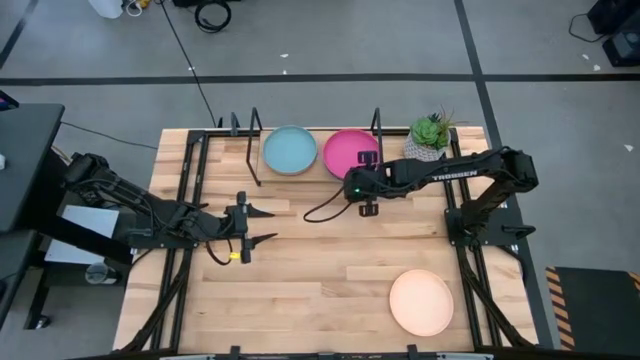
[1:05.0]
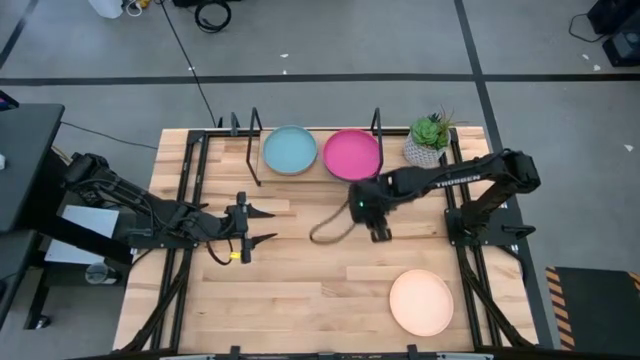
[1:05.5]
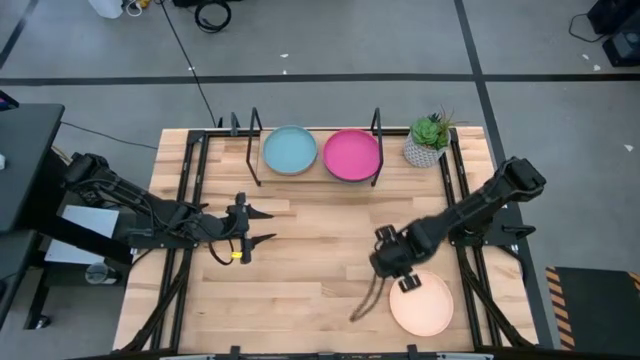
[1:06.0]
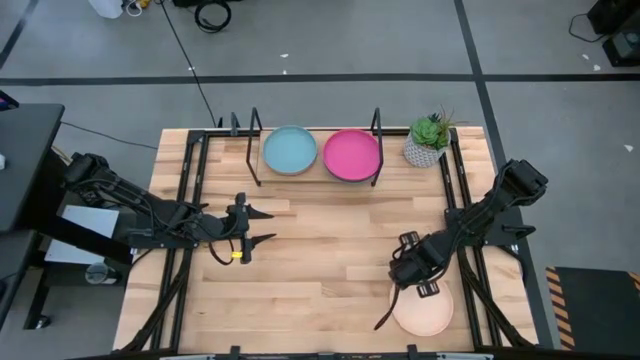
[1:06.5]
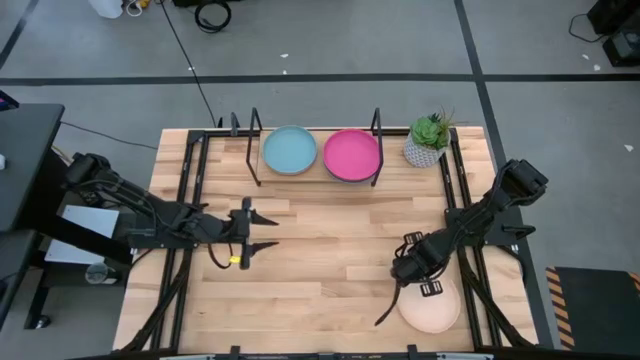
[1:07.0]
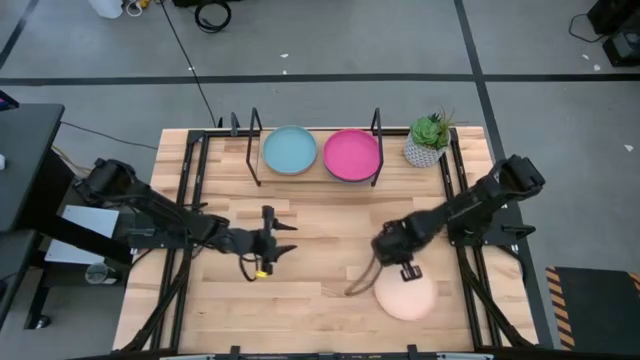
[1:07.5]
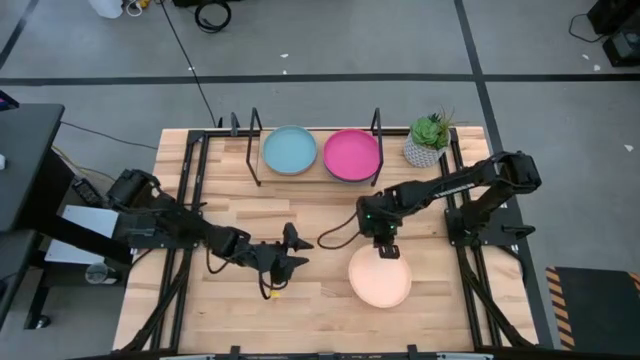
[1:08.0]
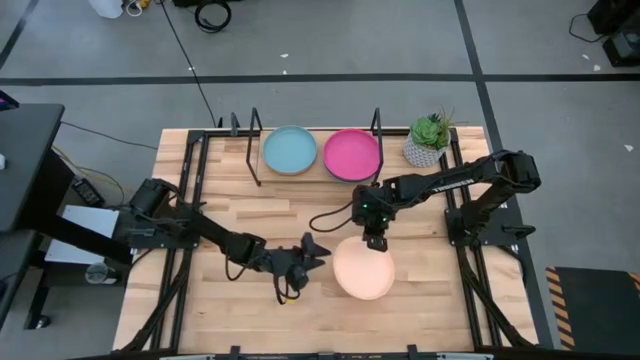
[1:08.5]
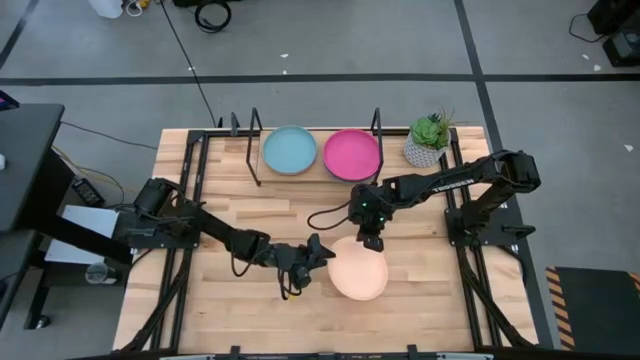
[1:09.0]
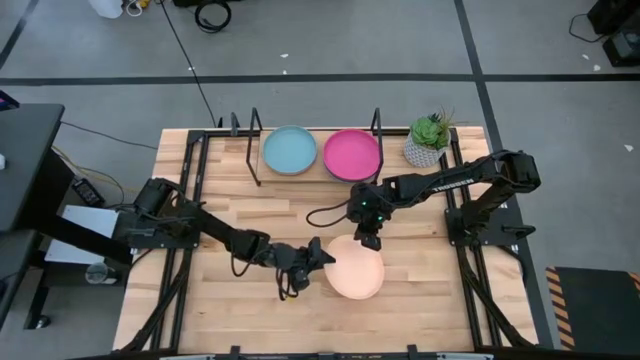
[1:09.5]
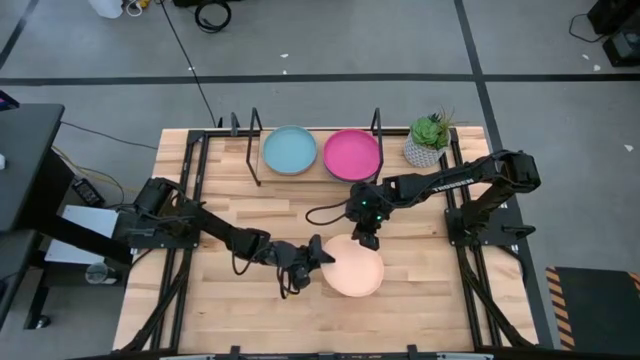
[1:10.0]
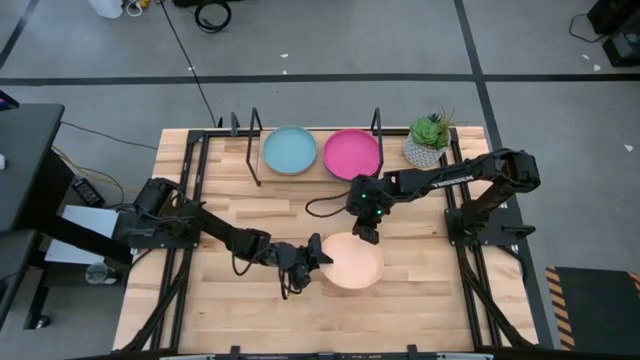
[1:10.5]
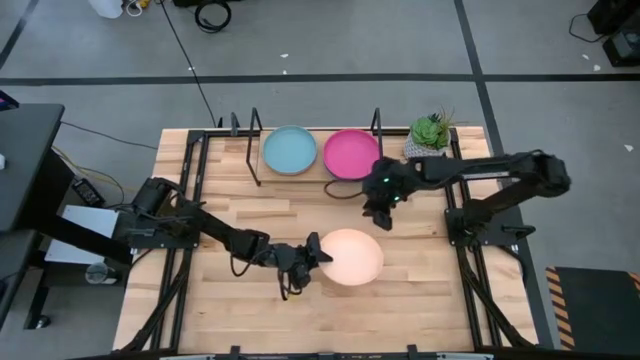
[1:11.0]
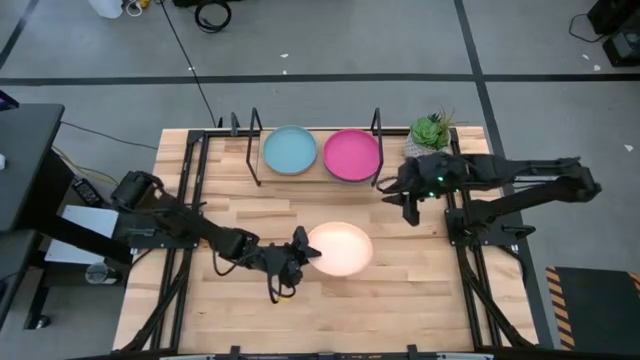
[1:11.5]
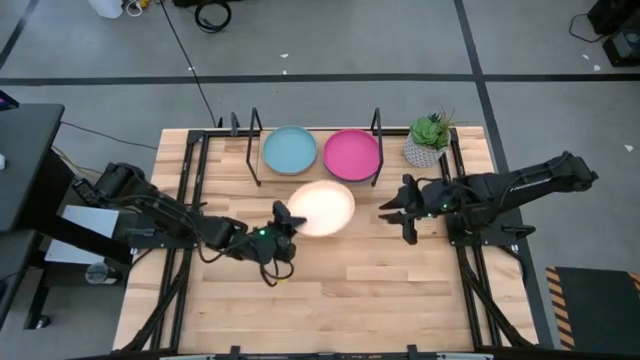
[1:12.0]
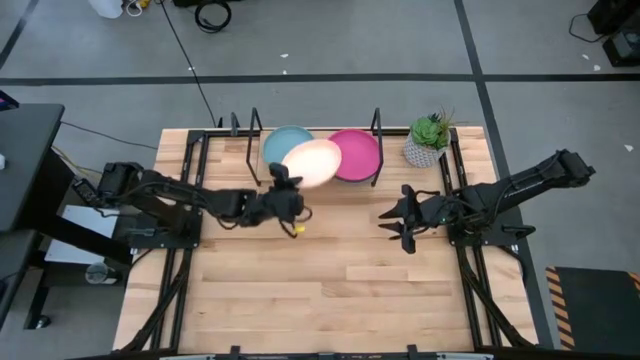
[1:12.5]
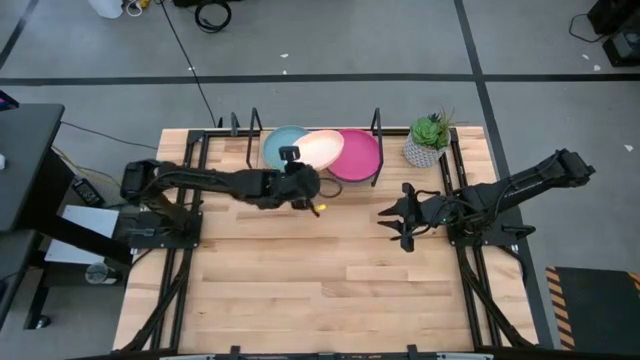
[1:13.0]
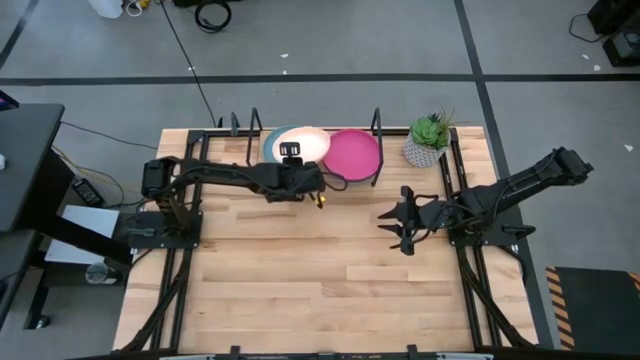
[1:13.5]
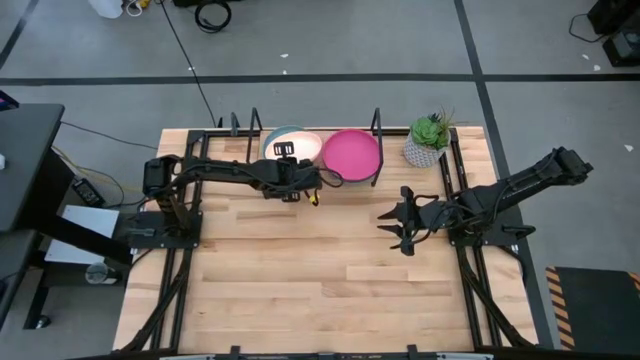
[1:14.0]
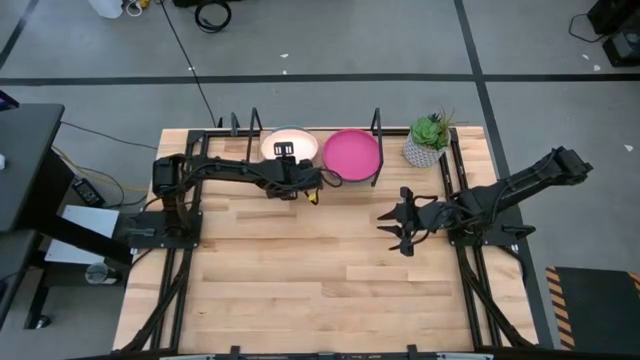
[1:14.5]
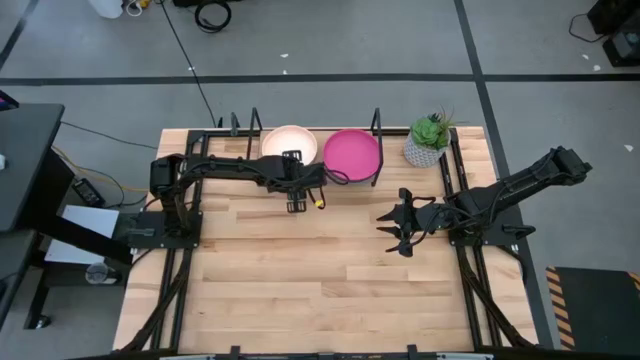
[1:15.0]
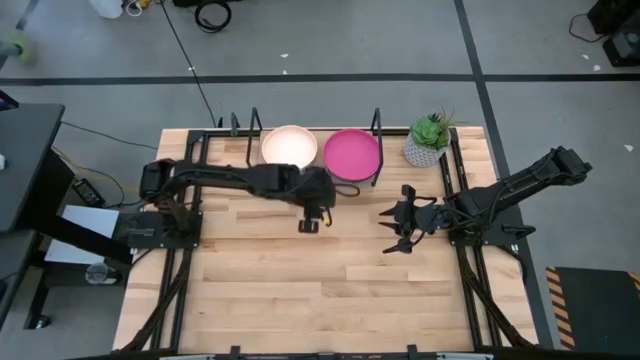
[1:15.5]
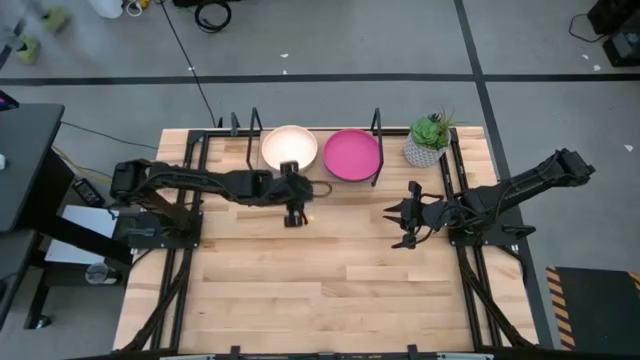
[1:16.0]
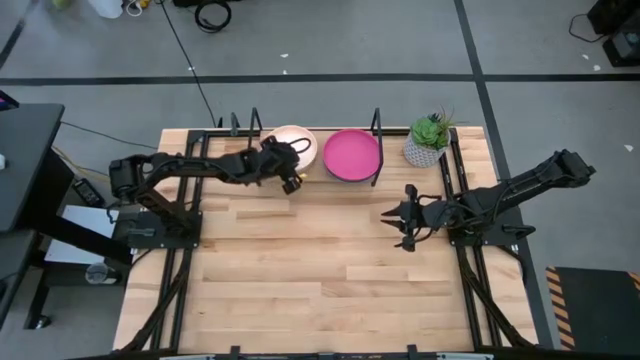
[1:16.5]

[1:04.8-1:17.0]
Task: Place and stack plates onto a shelf
Stack the white plate on top of the blue plate on the shelf

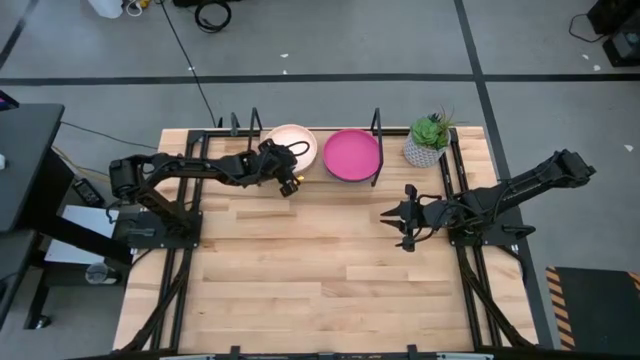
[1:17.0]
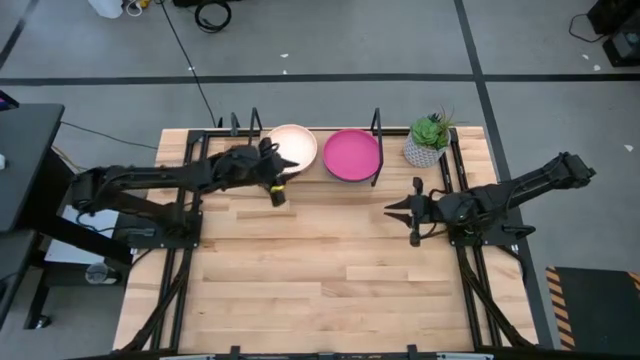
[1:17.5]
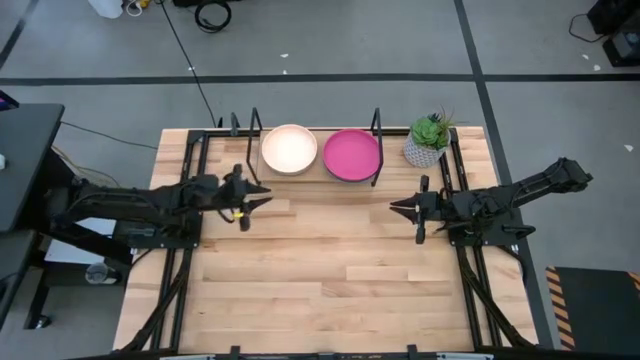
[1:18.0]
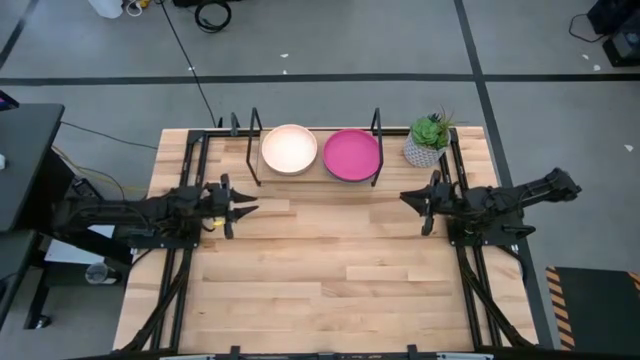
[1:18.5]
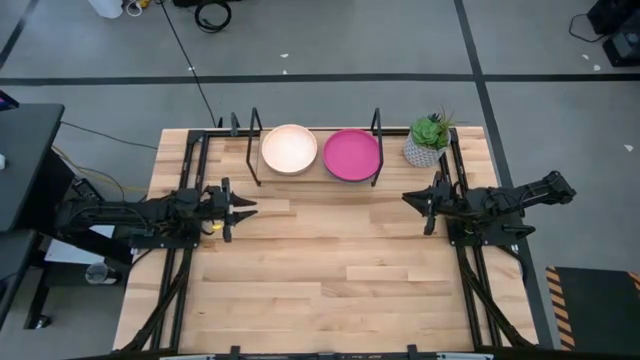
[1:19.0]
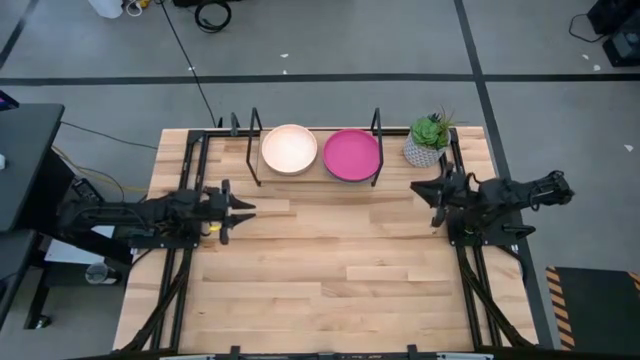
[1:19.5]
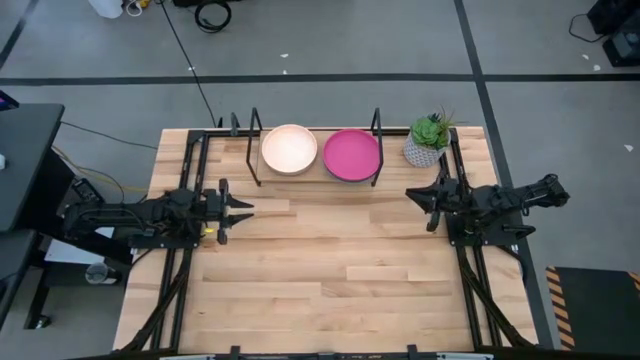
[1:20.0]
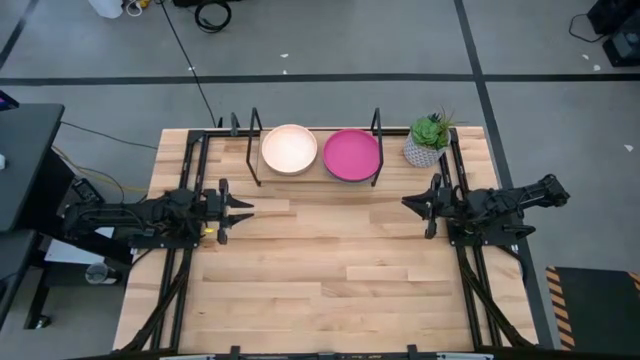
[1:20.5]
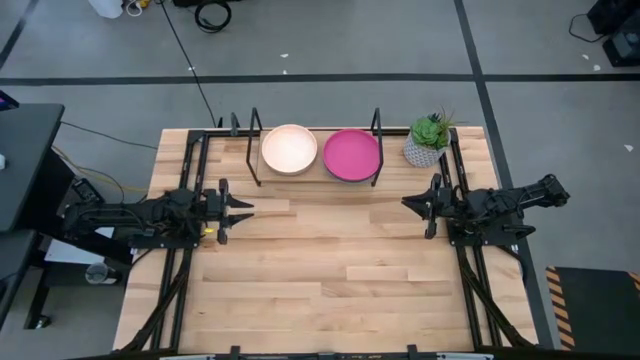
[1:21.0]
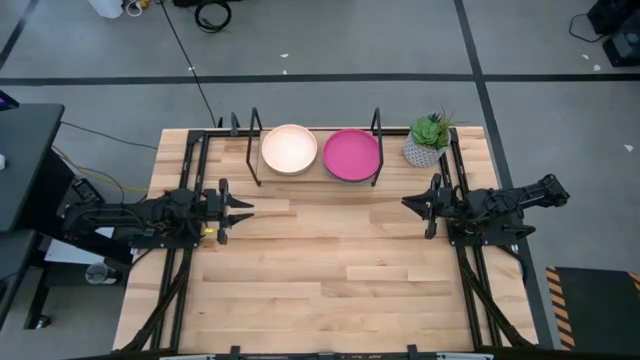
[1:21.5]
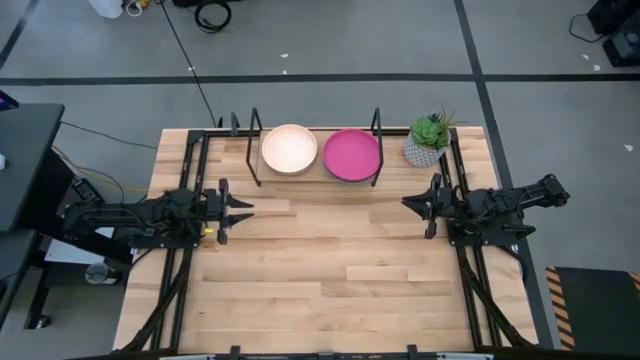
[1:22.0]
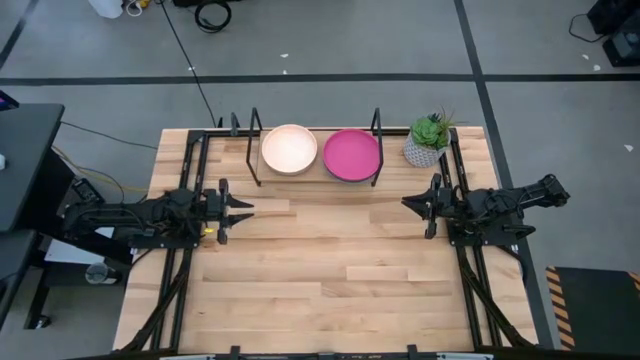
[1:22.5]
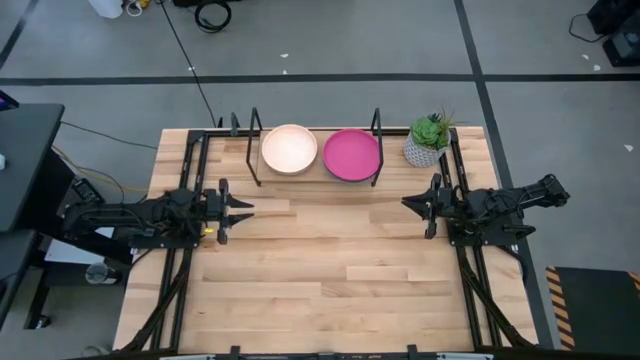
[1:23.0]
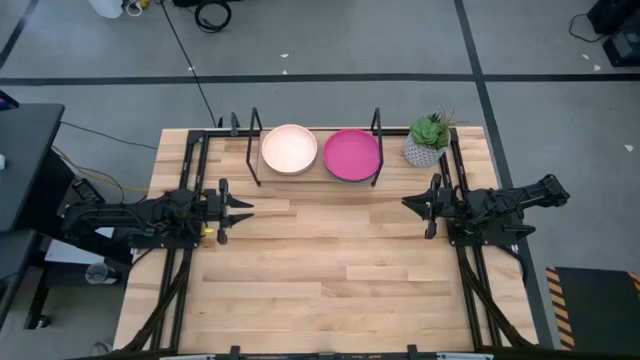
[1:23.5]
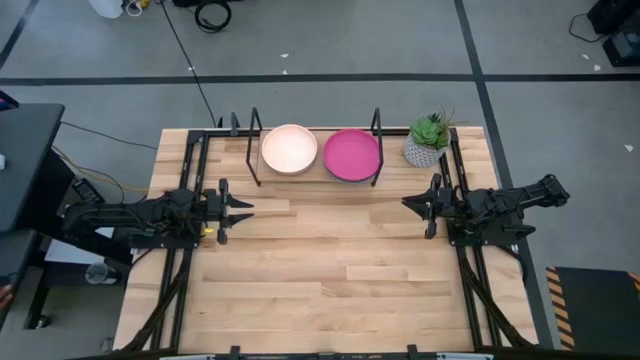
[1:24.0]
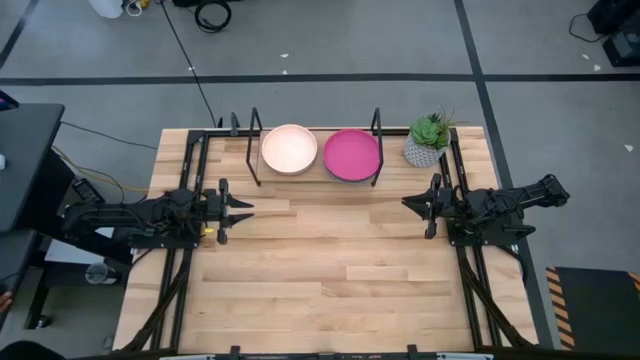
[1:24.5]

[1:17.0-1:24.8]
Return to Home Position

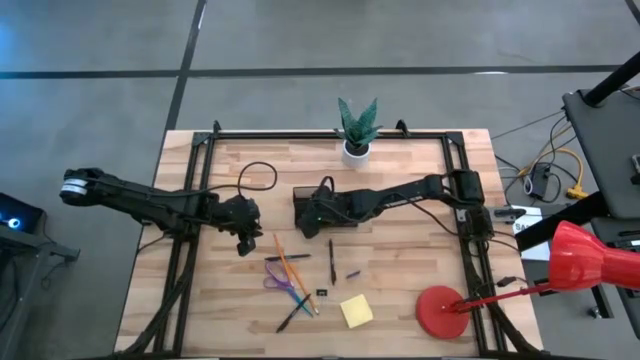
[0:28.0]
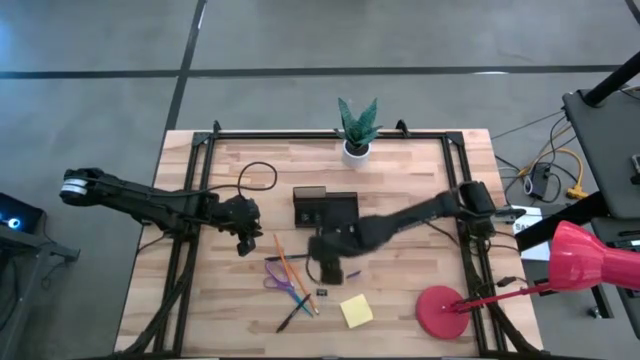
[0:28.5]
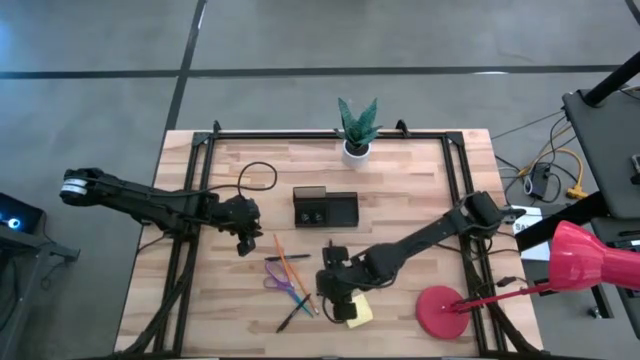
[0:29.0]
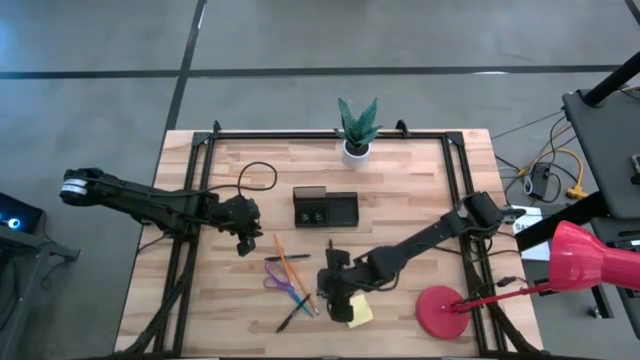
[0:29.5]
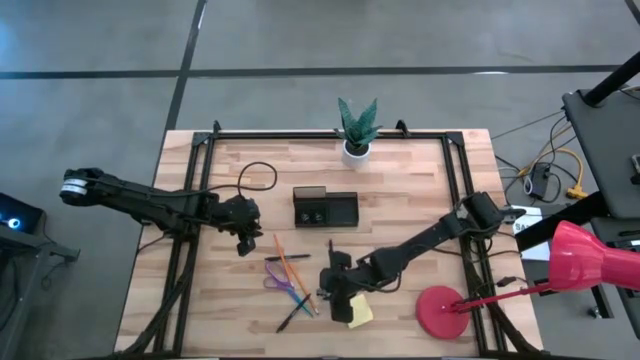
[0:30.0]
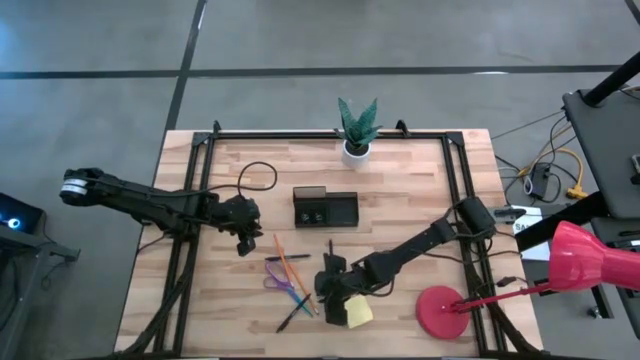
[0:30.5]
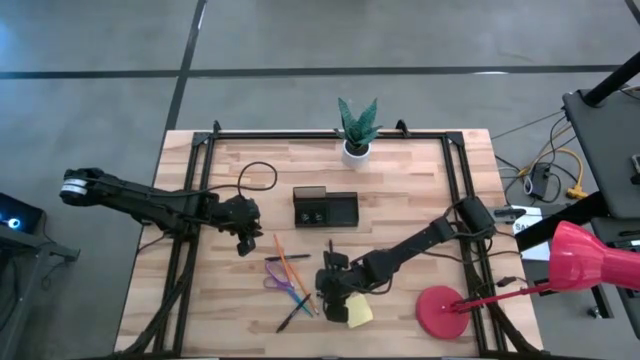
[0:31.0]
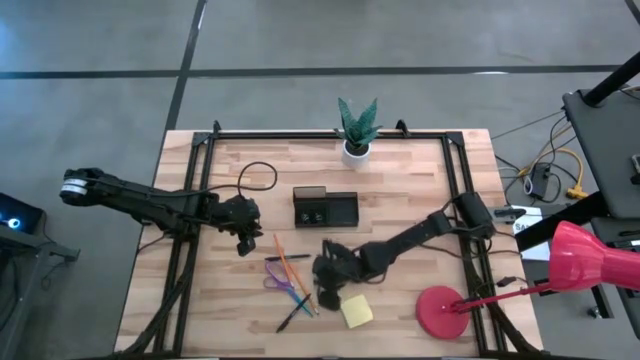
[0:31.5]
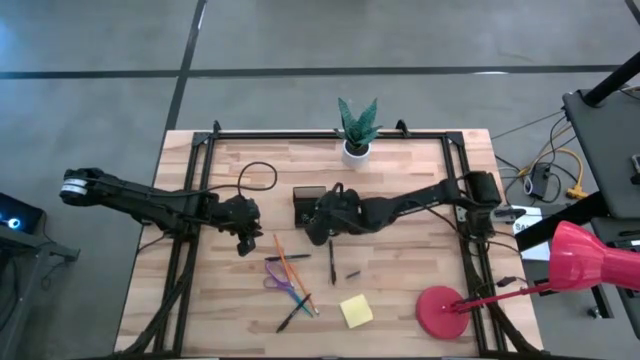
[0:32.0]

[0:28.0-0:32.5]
Task: Pick and place office supplies into organizer
Put the binder clip into the desk organizer
